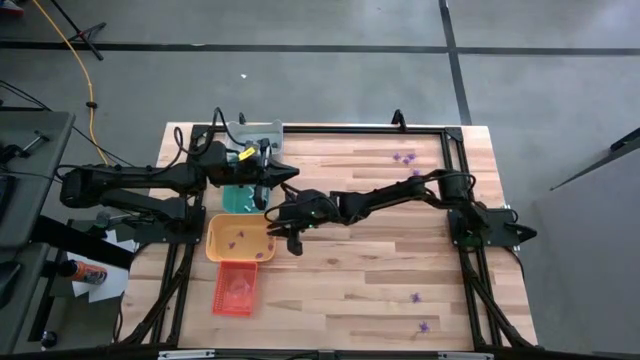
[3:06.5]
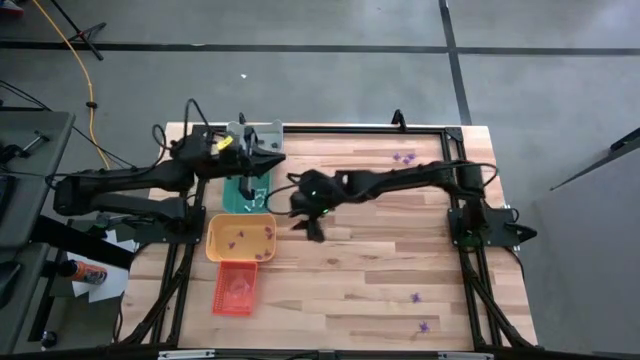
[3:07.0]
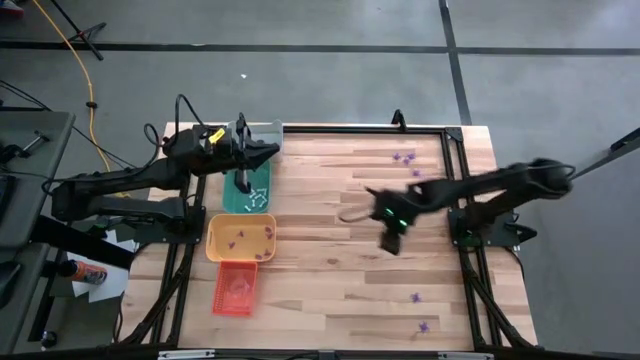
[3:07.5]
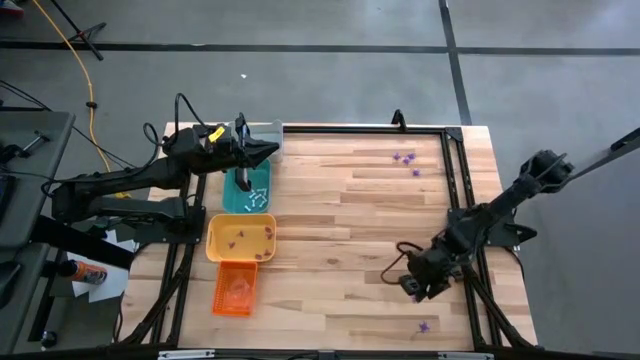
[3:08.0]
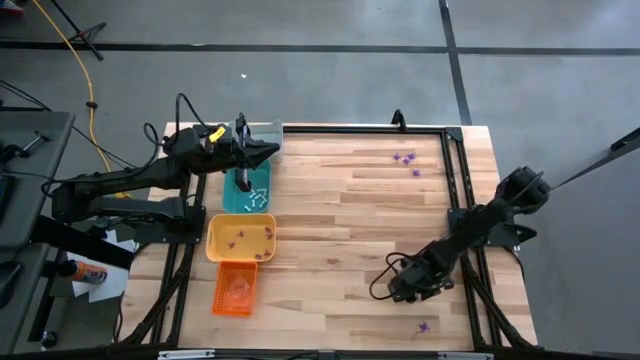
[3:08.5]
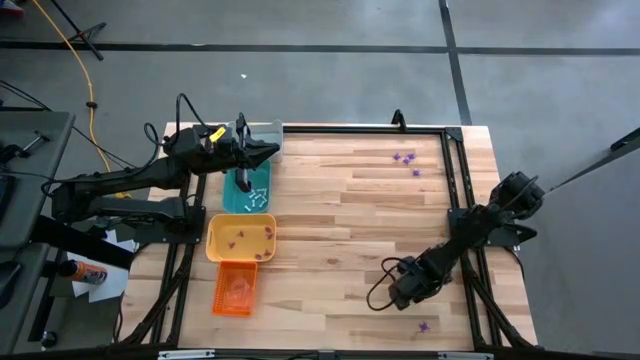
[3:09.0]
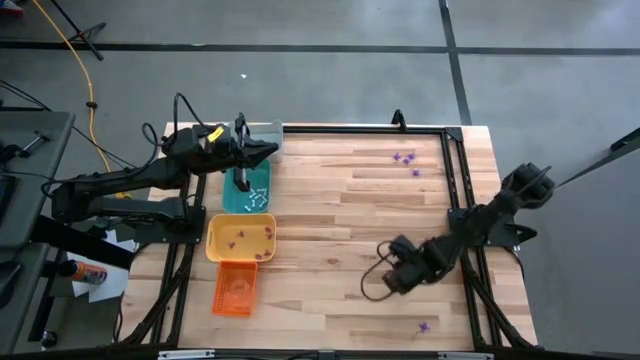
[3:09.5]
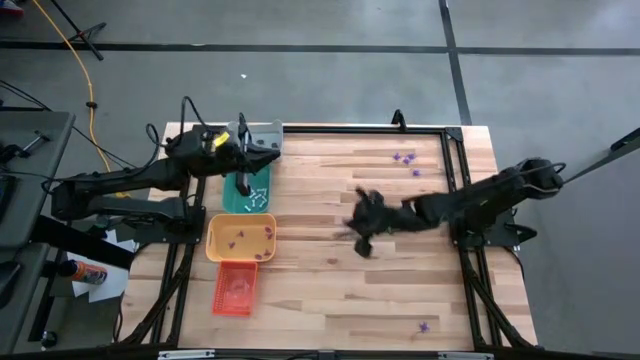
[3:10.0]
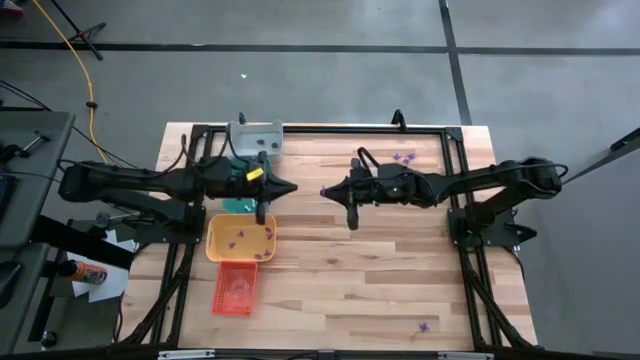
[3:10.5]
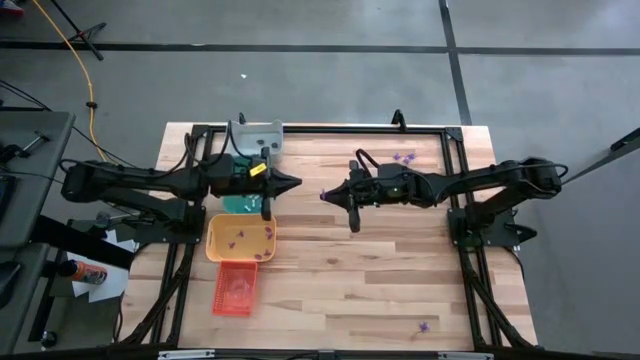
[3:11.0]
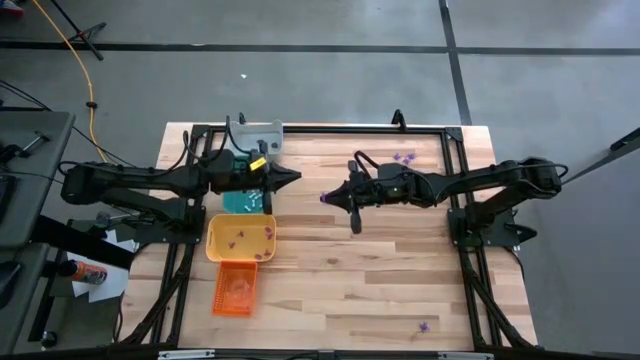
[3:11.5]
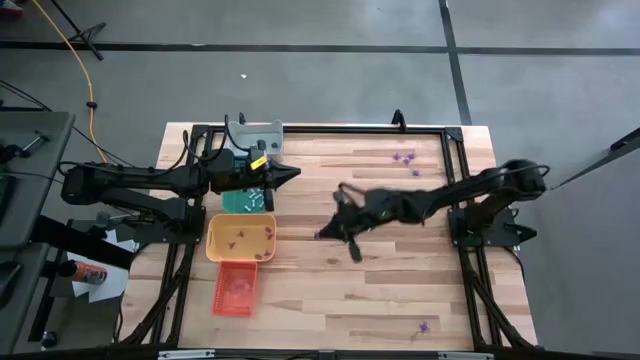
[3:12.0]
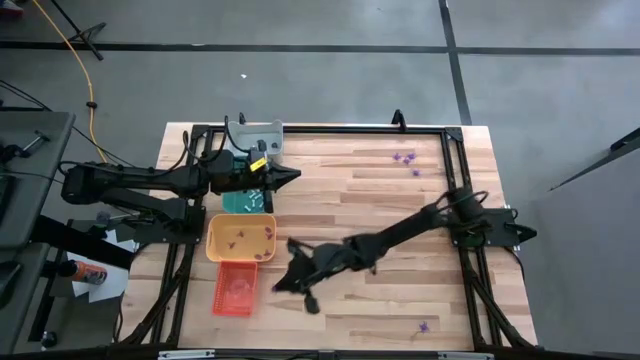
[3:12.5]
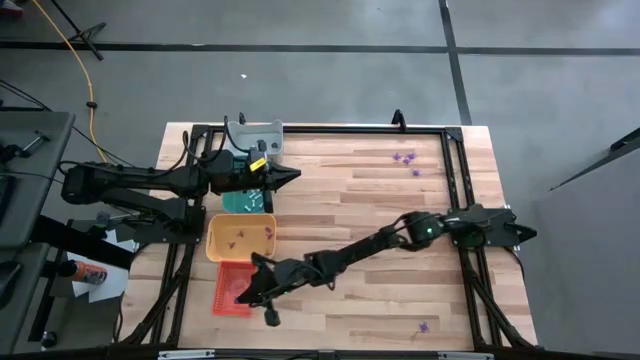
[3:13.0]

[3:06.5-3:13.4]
Task: Sort Halloween decoration
Put the purple spider toy in the orange bin

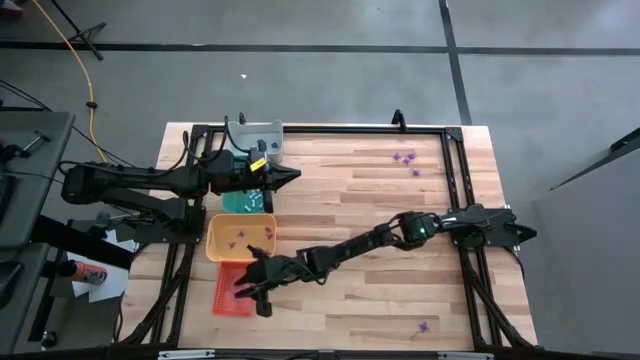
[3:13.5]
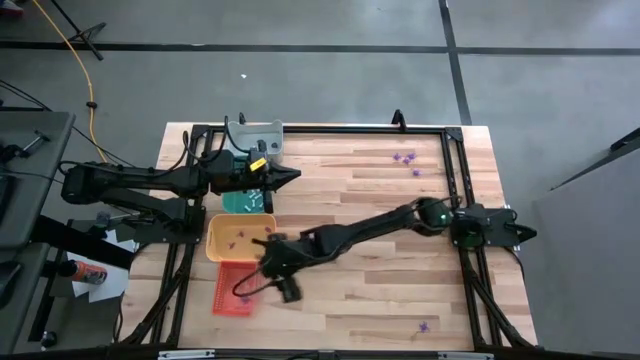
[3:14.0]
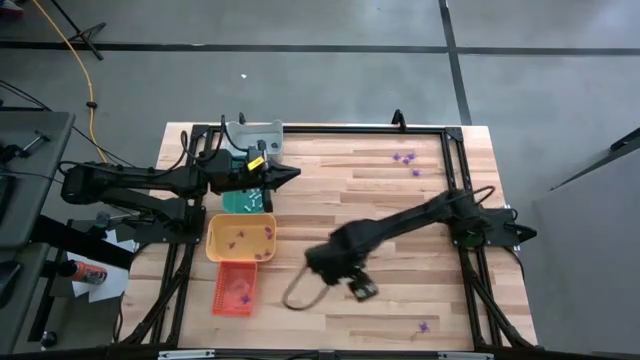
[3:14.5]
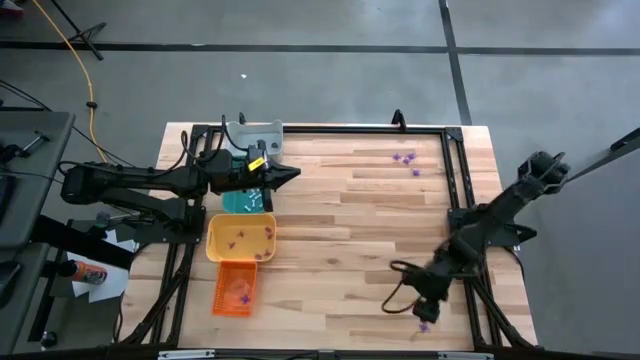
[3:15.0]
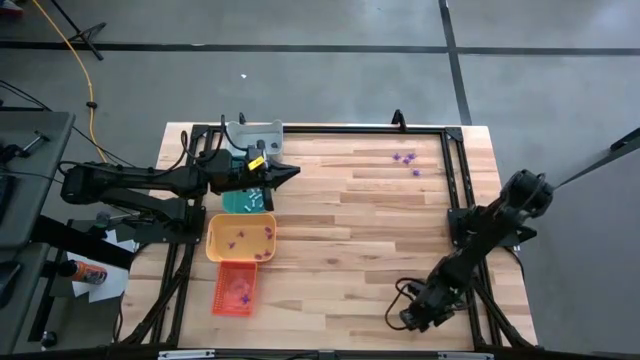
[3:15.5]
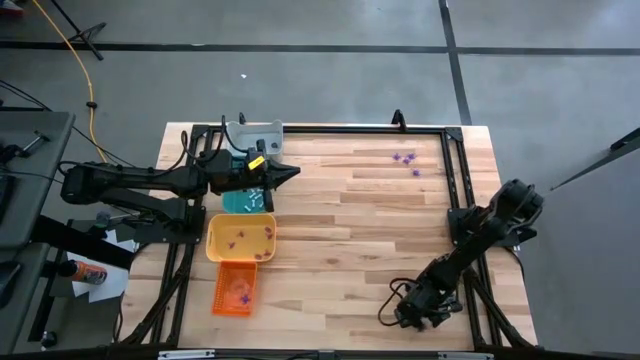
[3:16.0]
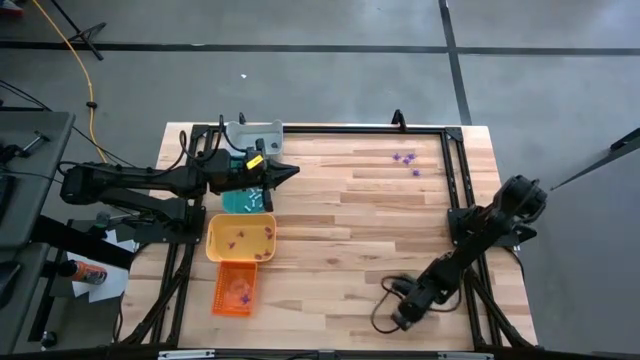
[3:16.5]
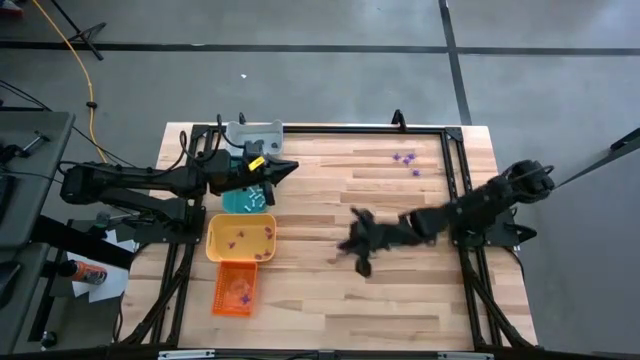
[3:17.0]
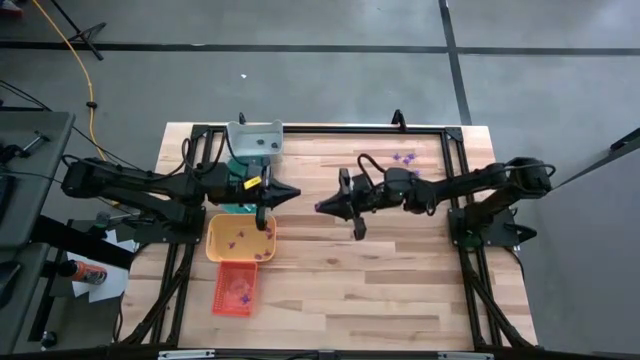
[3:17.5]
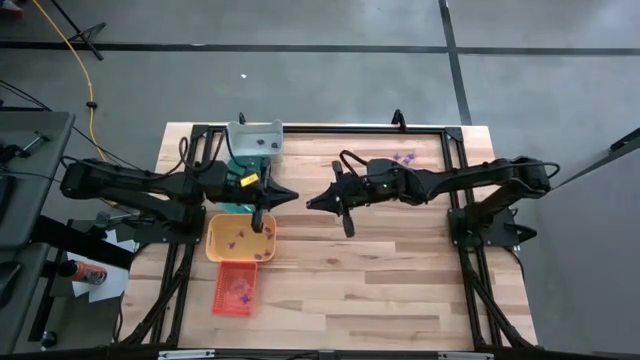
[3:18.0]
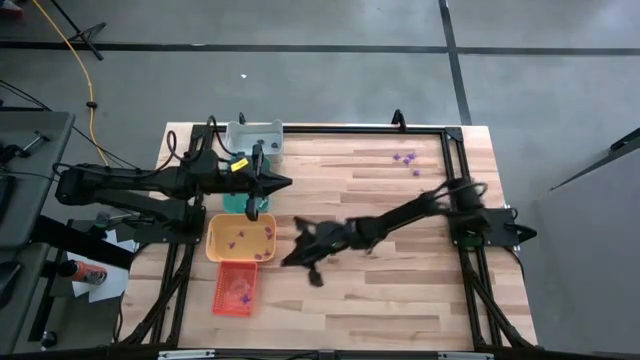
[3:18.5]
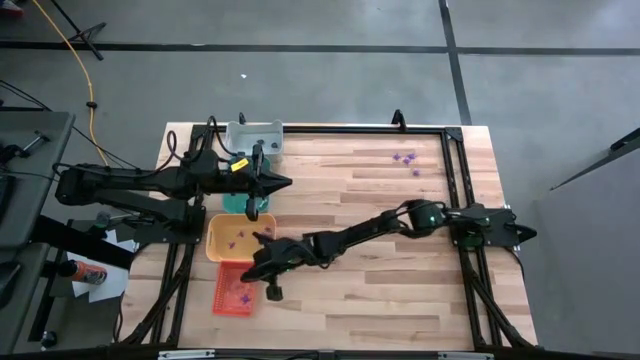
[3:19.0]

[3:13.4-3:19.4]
Put the purple spider toy in the orange bin

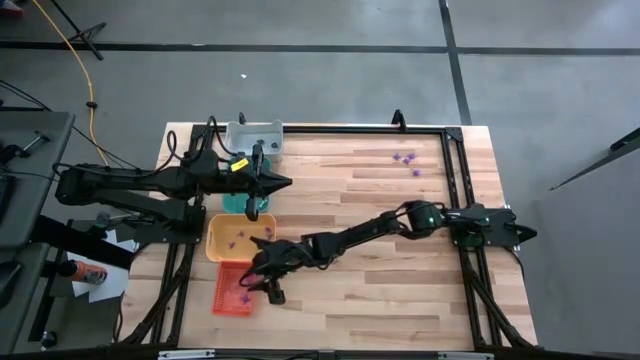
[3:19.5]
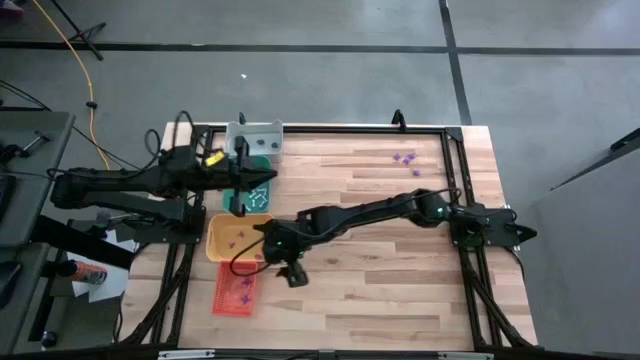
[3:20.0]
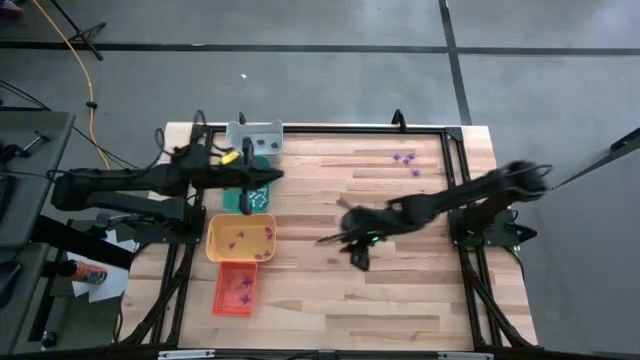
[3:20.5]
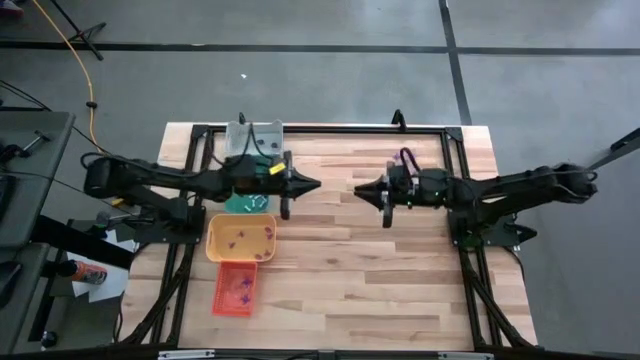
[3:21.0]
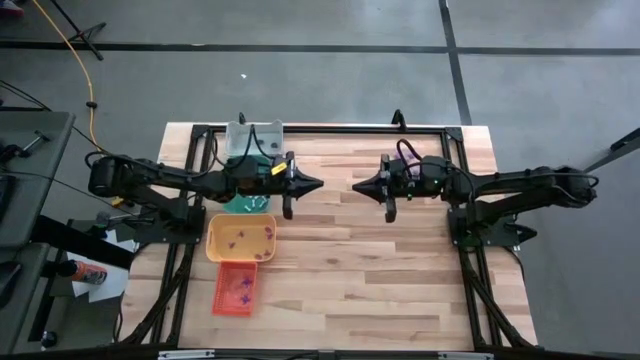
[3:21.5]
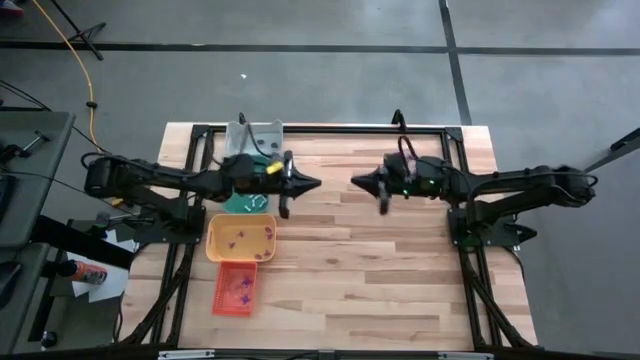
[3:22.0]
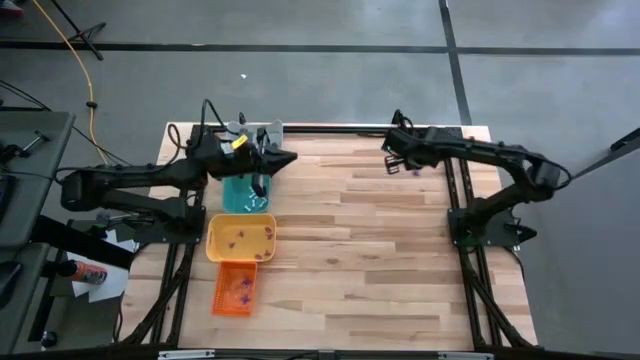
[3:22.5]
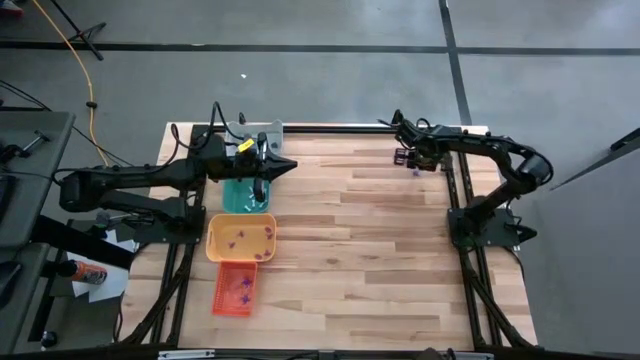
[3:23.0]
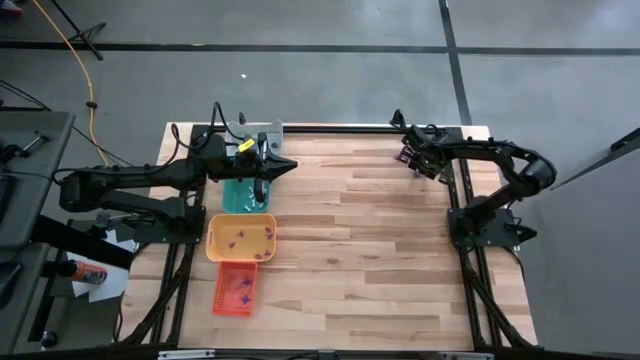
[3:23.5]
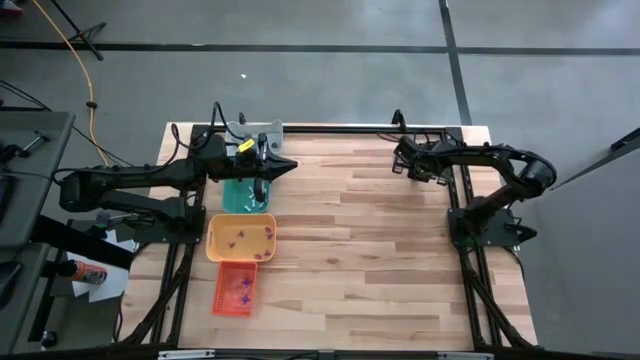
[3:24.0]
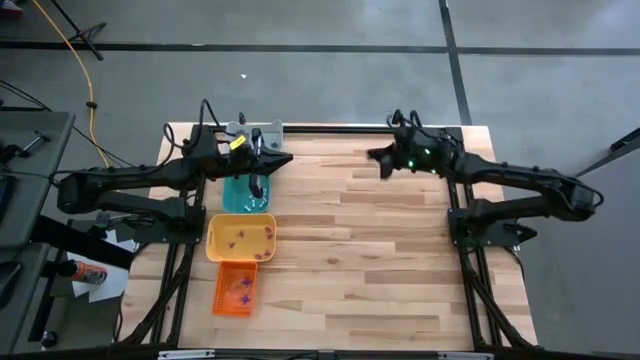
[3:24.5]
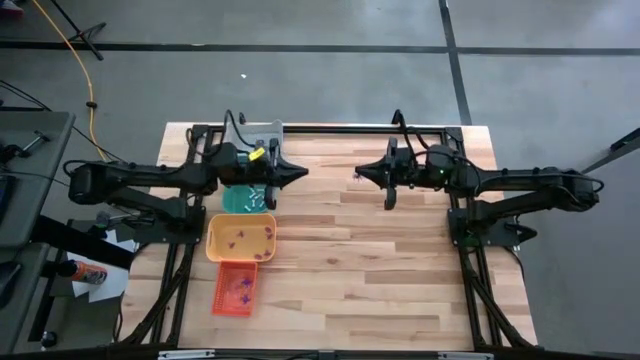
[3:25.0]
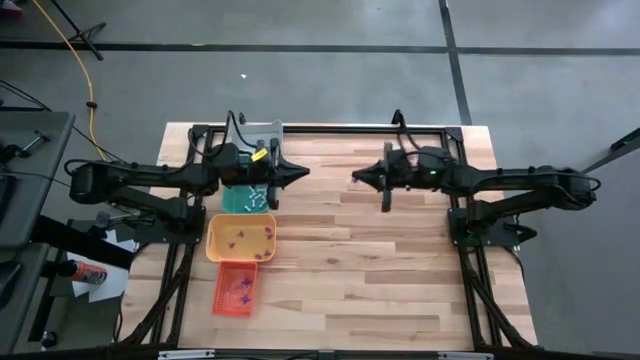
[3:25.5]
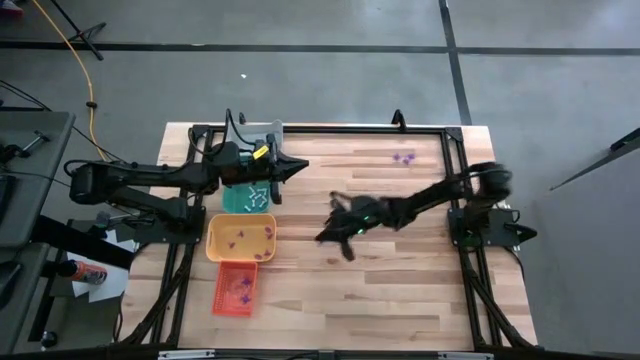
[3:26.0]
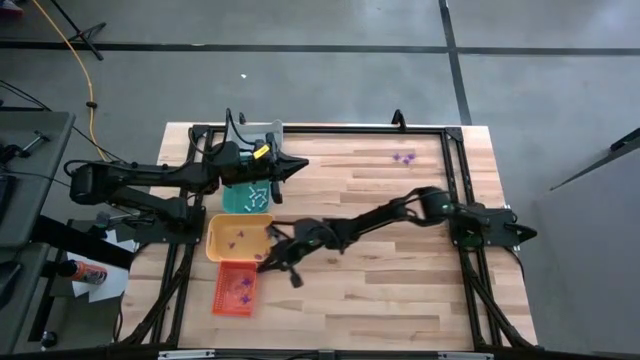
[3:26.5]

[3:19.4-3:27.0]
Put the purple spider toy in the orange bin
